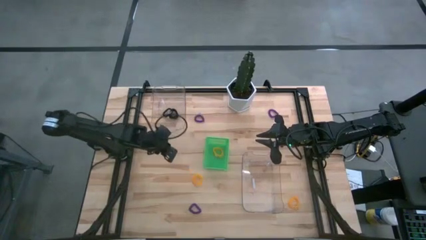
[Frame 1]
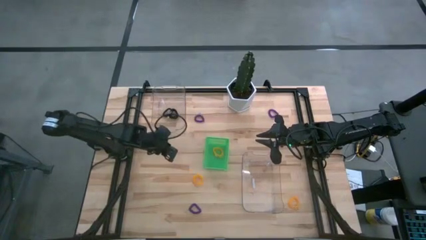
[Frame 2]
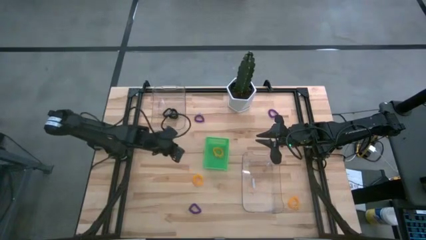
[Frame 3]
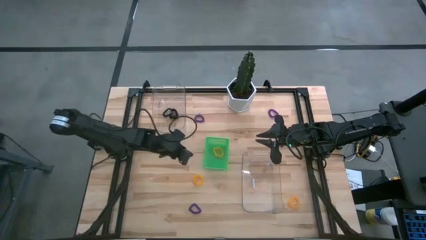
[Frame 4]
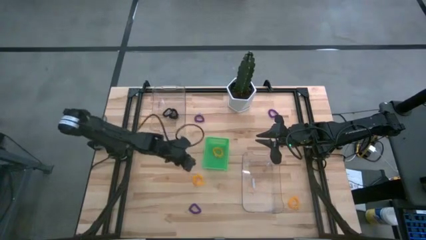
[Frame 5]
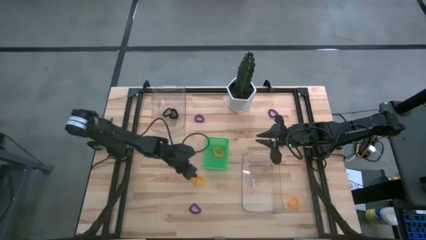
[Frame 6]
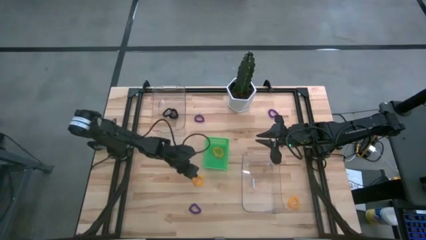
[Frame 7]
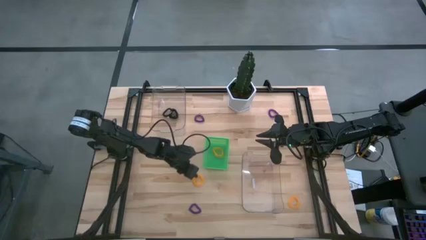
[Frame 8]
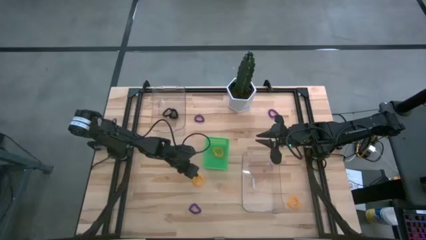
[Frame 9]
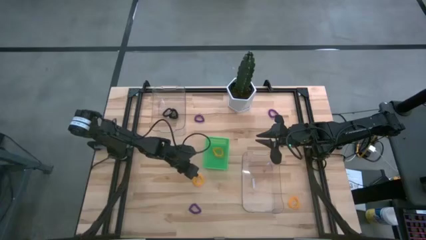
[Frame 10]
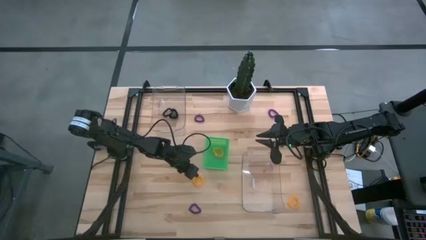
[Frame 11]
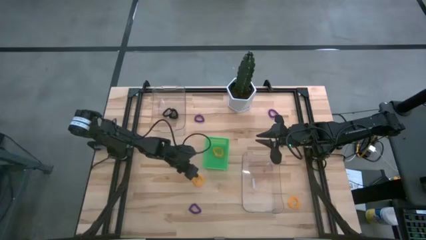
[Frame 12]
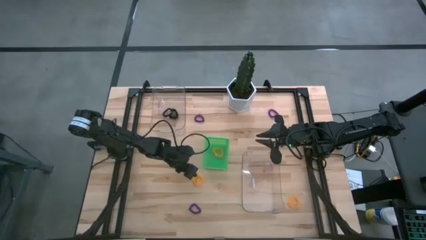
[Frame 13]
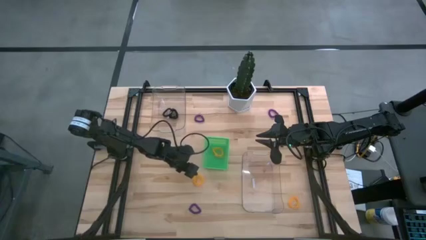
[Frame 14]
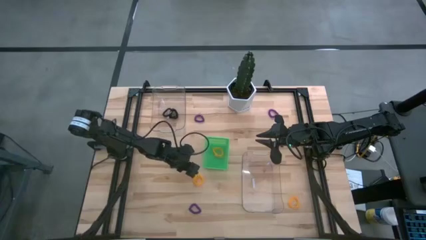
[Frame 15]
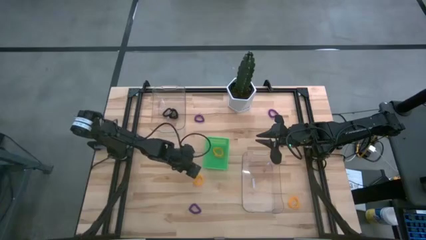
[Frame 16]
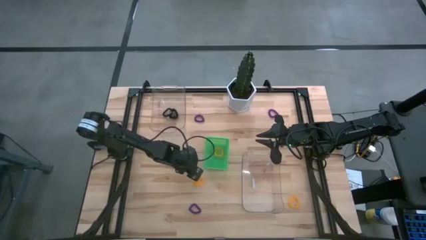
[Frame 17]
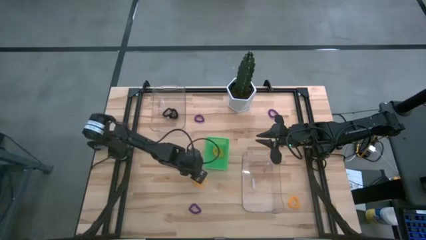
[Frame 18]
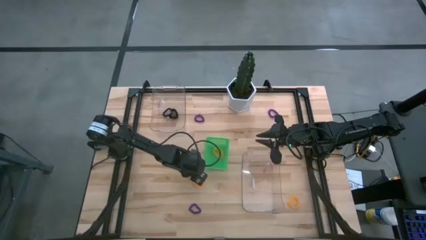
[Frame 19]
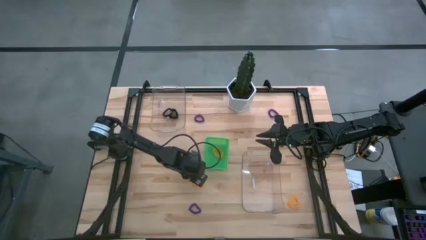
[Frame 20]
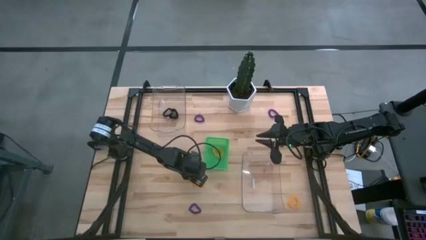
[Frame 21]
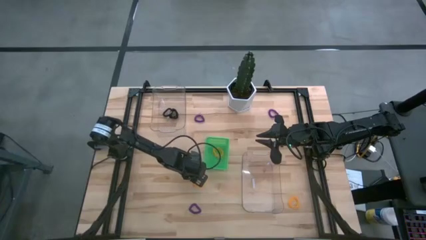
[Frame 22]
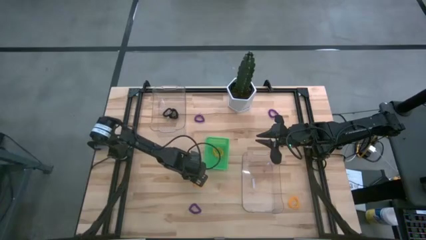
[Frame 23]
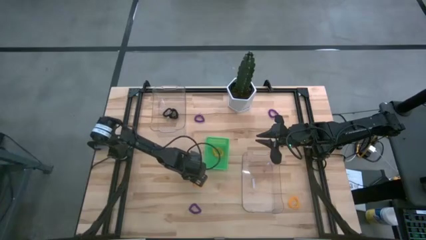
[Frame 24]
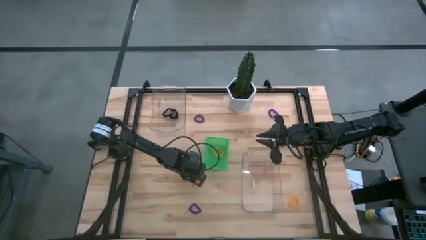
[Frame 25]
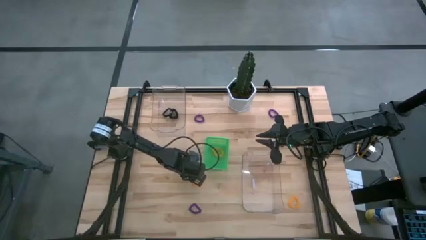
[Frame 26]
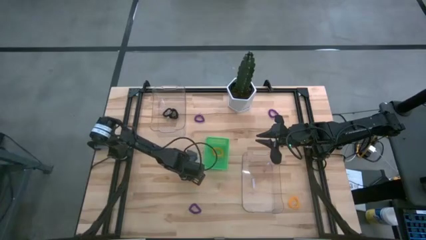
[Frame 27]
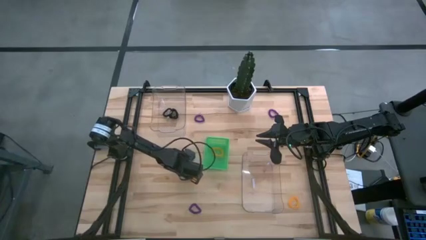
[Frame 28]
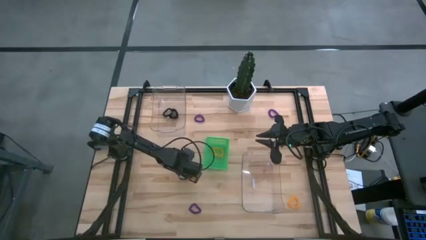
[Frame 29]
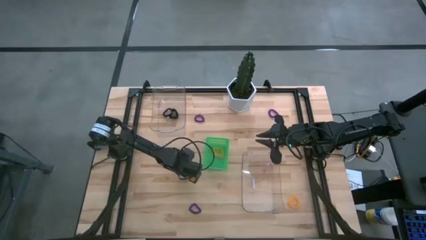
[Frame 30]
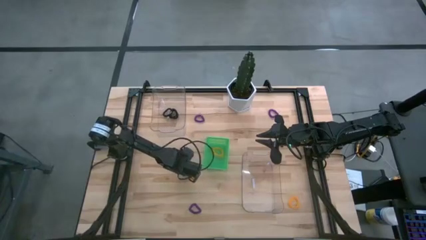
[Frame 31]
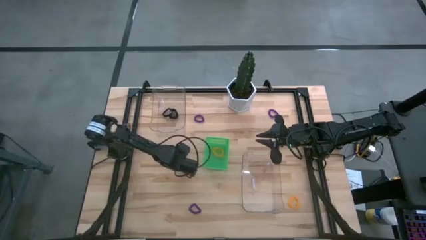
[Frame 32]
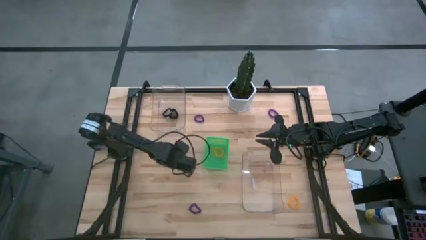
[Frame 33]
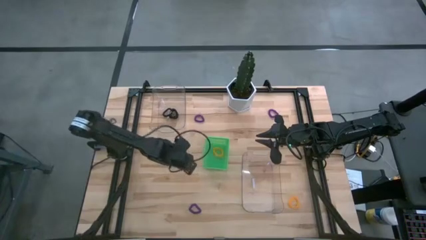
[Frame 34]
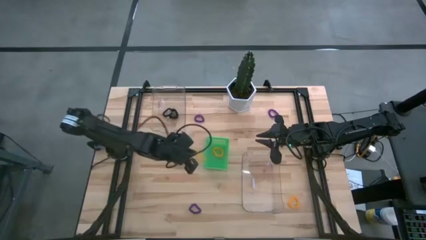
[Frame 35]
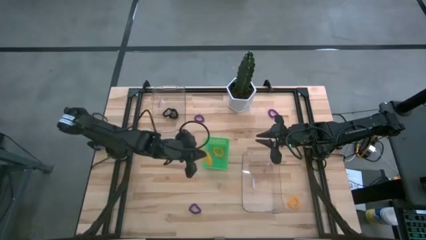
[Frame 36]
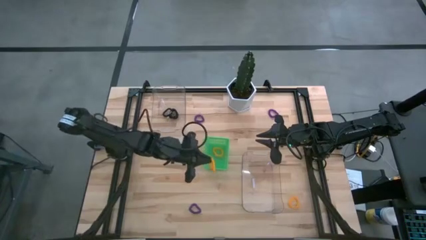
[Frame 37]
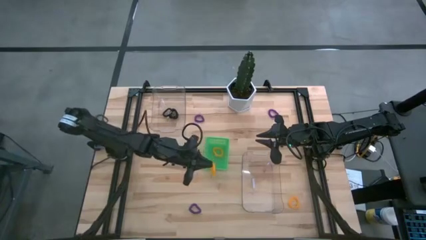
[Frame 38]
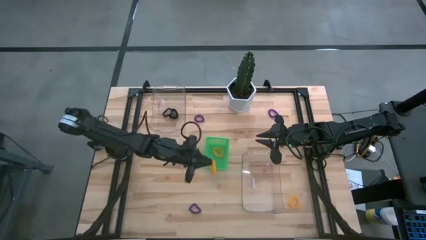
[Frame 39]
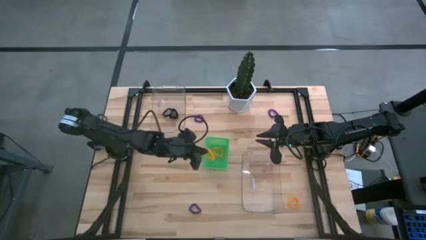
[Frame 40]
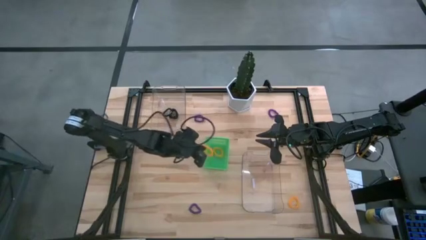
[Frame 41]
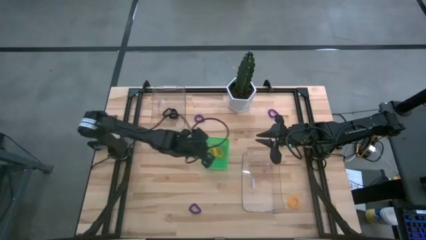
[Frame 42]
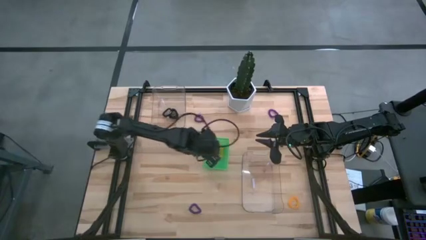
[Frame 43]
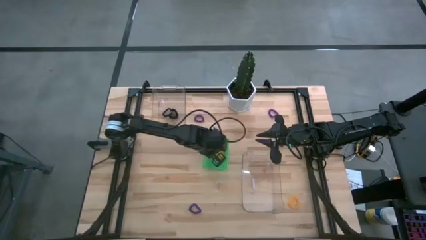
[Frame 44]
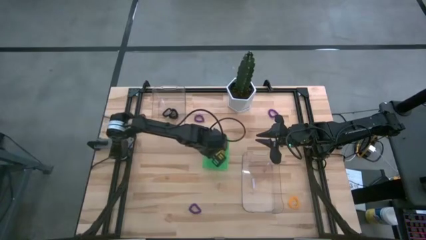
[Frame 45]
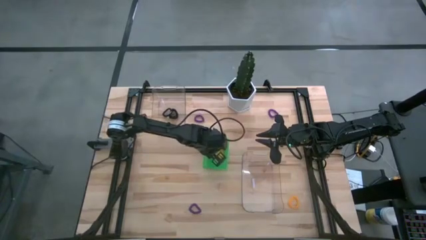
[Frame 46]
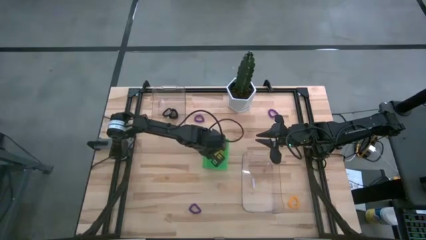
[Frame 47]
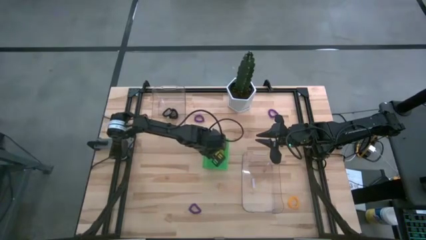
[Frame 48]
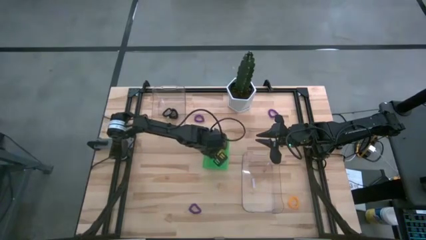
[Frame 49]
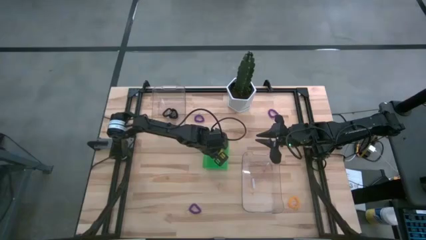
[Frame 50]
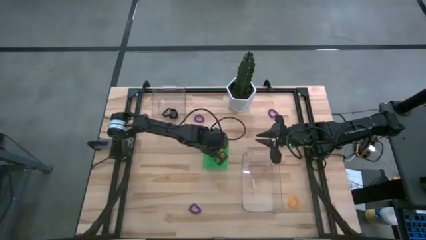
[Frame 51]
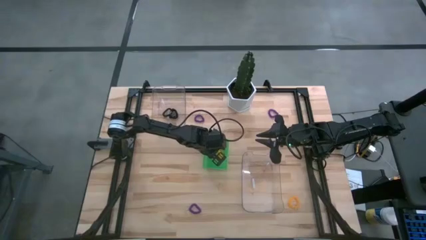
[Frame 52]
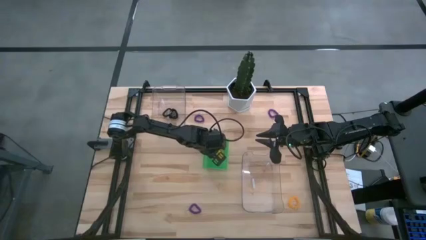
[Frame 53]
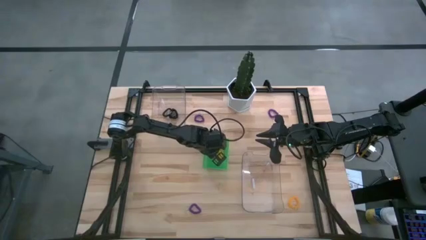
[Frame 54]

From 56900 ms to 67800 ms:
Task: Sort spring keychains
Put the left orange spring keychain into the green bin
